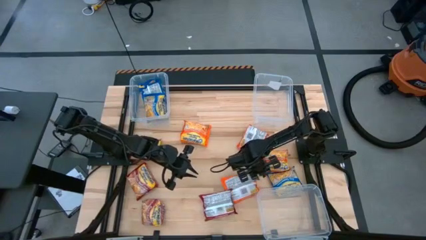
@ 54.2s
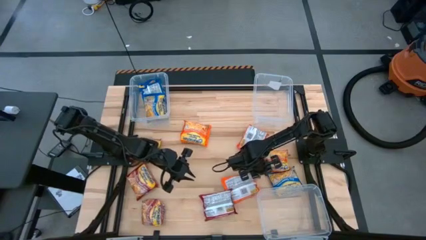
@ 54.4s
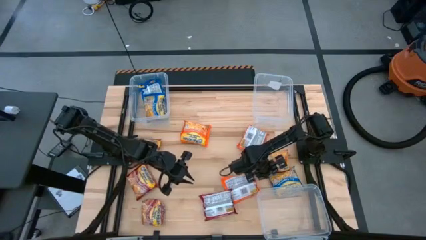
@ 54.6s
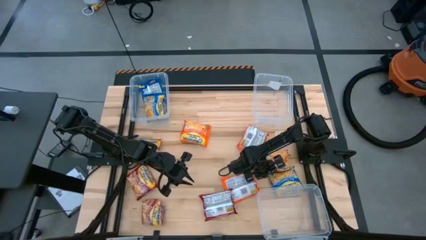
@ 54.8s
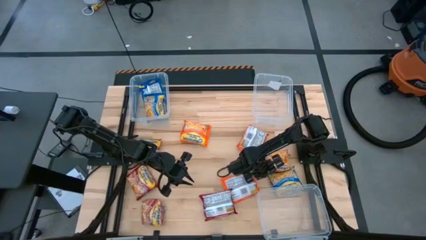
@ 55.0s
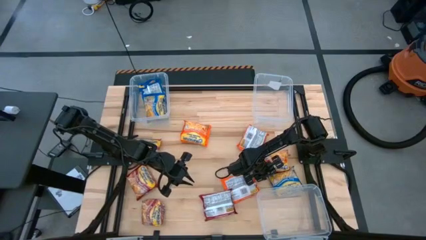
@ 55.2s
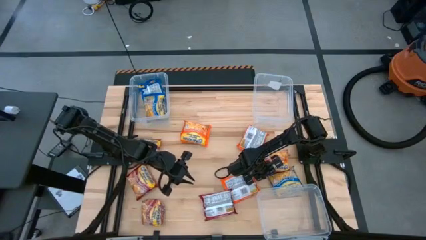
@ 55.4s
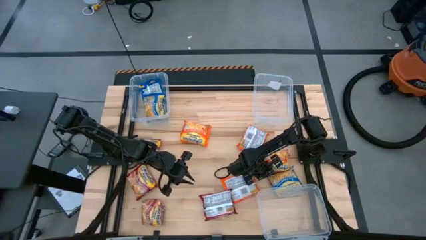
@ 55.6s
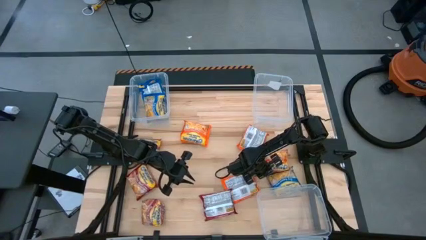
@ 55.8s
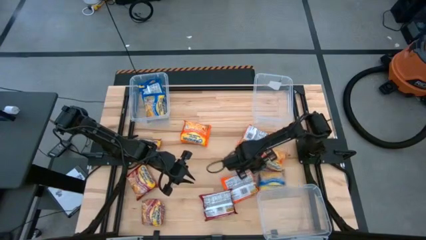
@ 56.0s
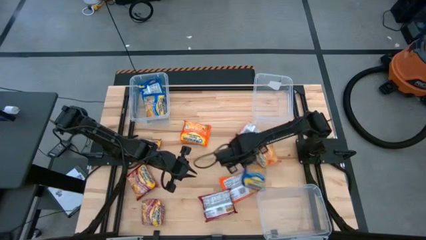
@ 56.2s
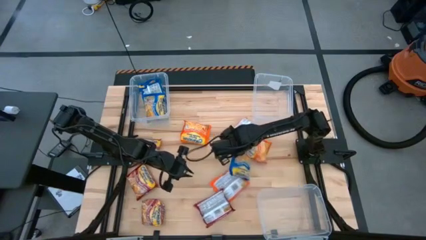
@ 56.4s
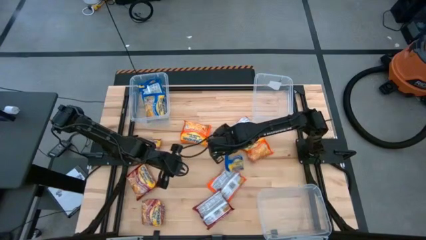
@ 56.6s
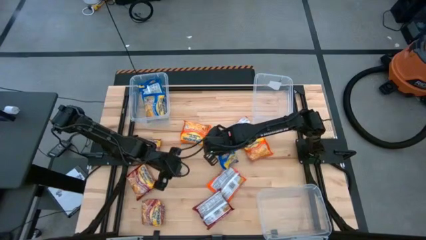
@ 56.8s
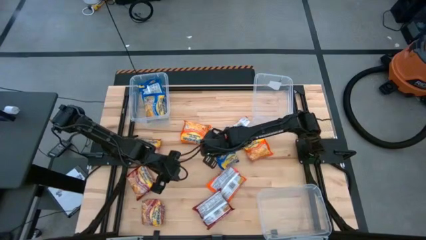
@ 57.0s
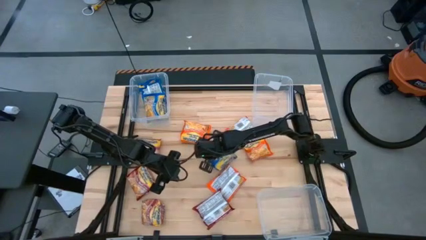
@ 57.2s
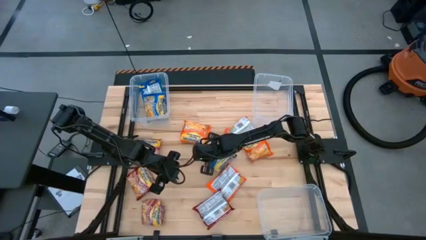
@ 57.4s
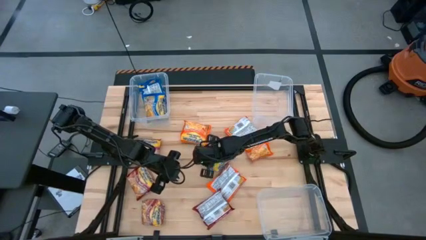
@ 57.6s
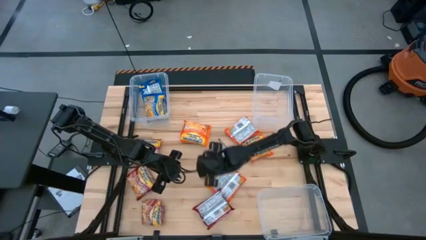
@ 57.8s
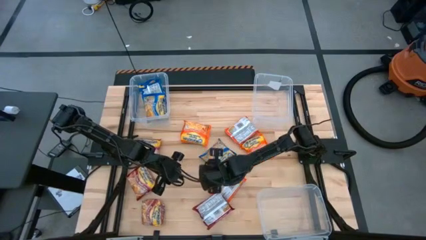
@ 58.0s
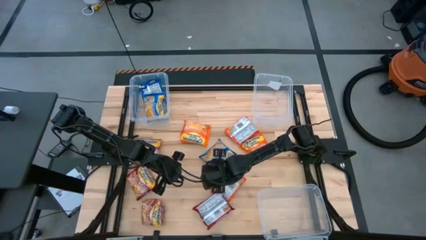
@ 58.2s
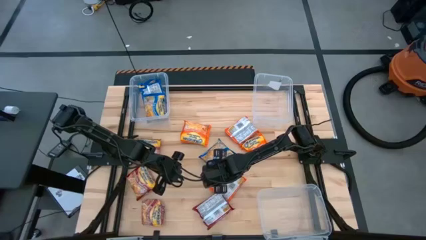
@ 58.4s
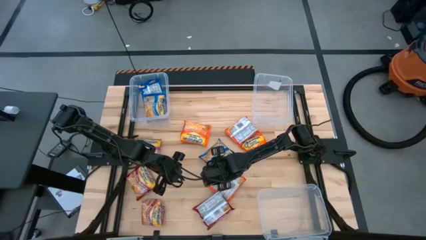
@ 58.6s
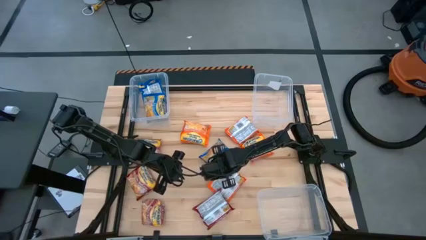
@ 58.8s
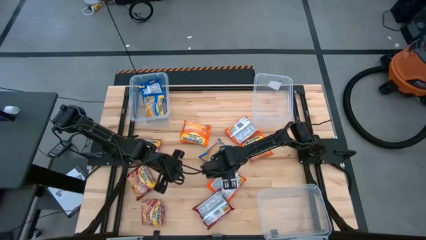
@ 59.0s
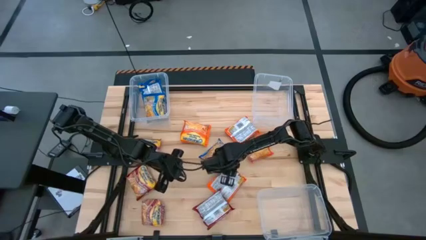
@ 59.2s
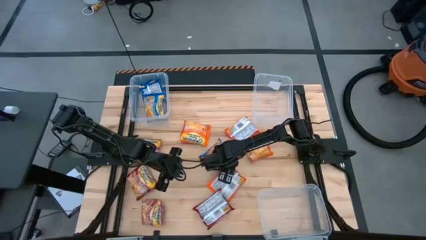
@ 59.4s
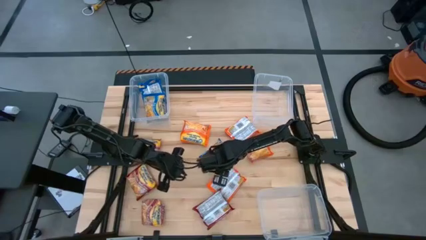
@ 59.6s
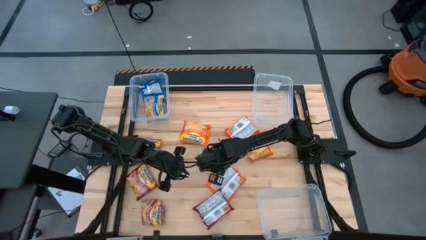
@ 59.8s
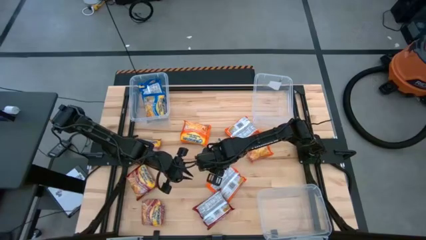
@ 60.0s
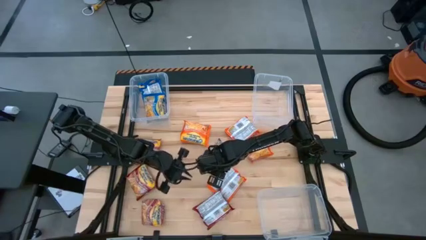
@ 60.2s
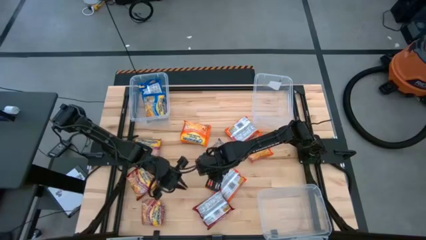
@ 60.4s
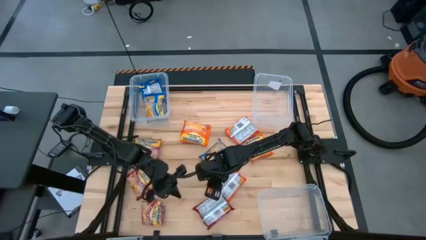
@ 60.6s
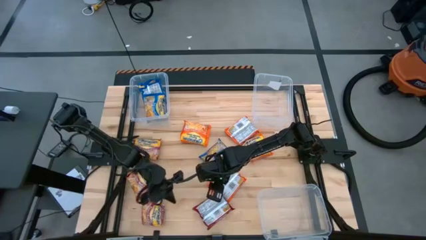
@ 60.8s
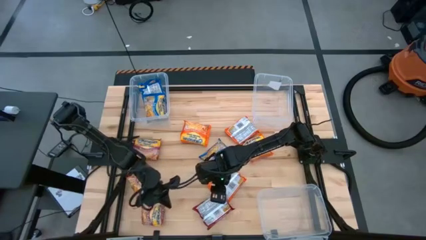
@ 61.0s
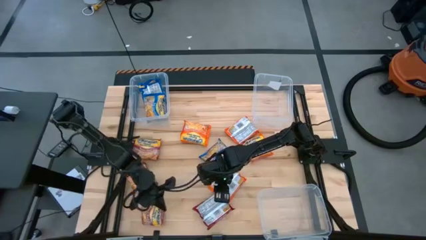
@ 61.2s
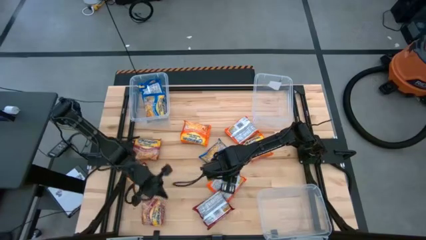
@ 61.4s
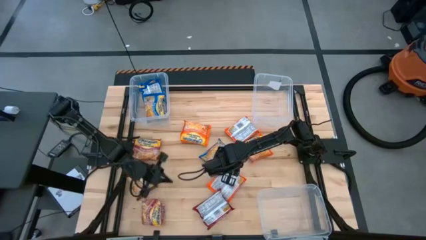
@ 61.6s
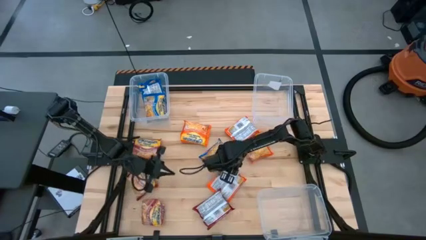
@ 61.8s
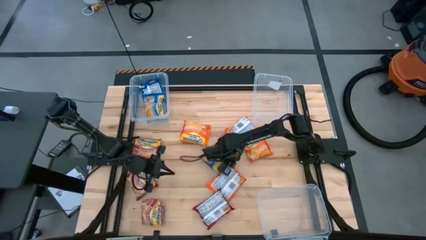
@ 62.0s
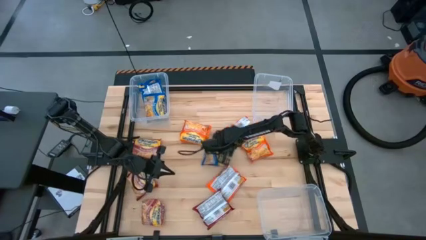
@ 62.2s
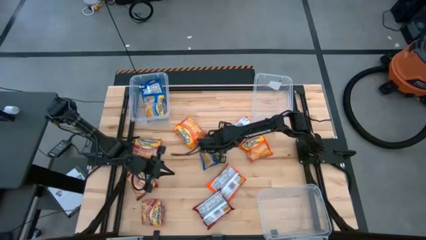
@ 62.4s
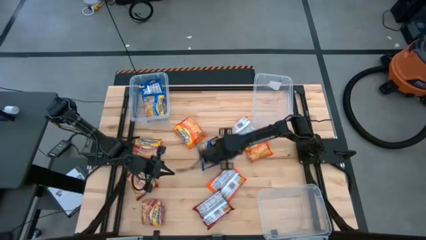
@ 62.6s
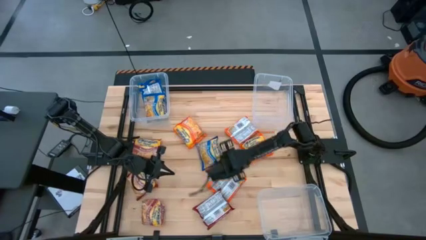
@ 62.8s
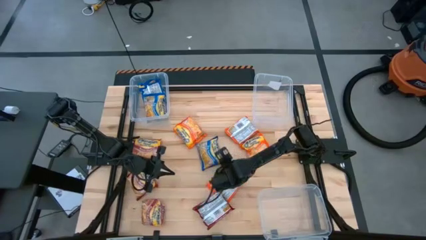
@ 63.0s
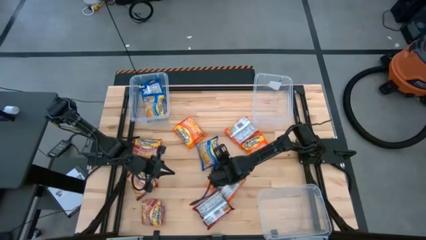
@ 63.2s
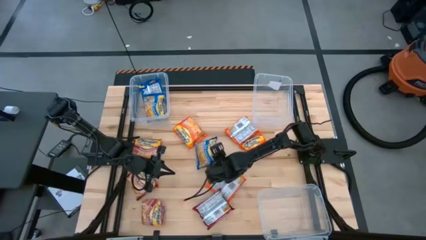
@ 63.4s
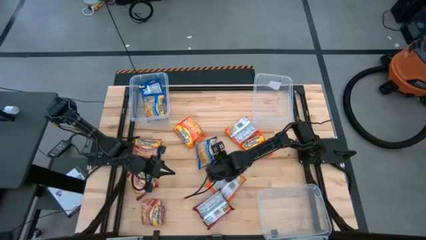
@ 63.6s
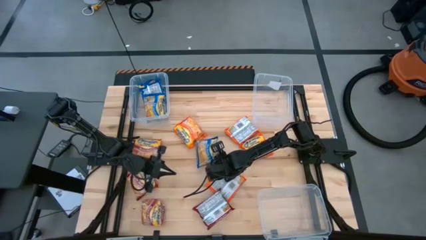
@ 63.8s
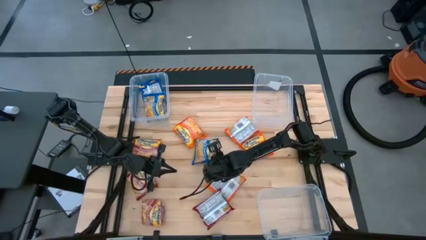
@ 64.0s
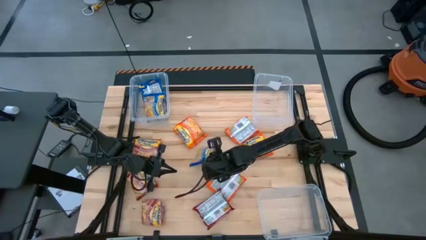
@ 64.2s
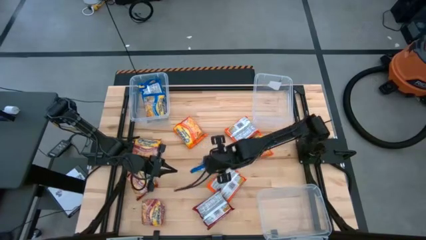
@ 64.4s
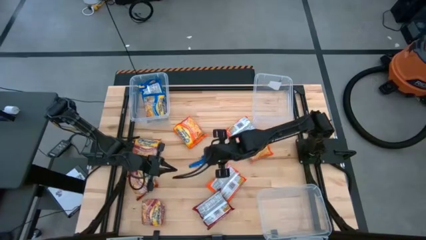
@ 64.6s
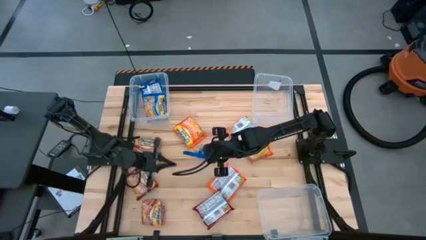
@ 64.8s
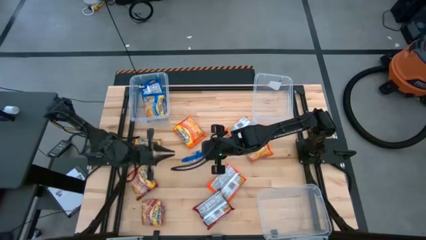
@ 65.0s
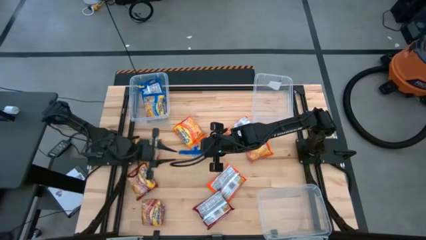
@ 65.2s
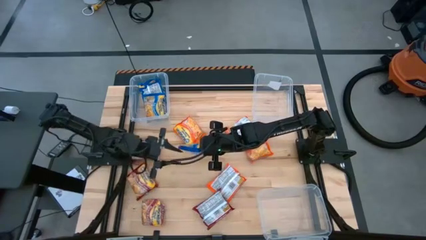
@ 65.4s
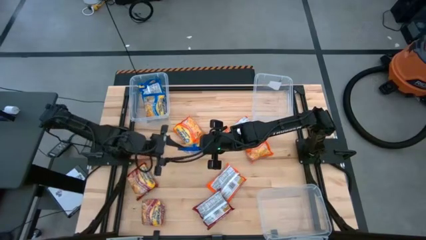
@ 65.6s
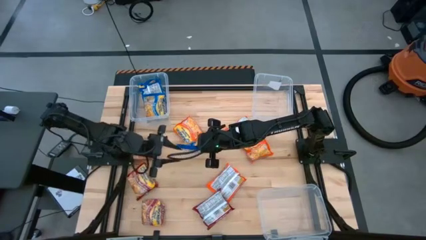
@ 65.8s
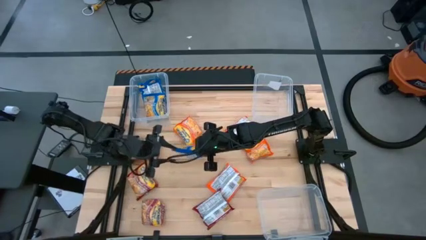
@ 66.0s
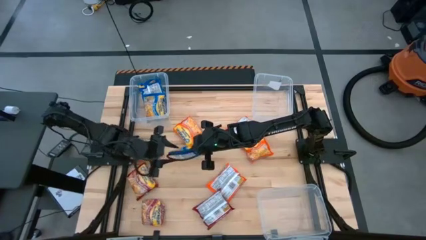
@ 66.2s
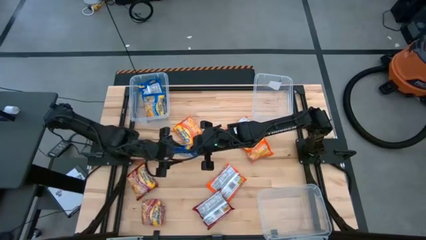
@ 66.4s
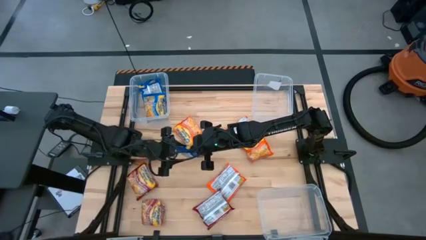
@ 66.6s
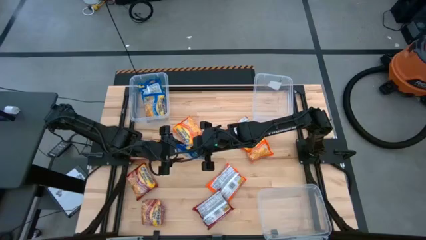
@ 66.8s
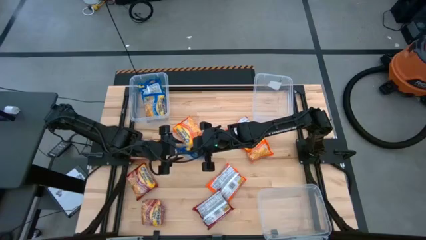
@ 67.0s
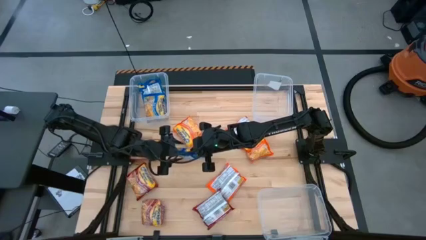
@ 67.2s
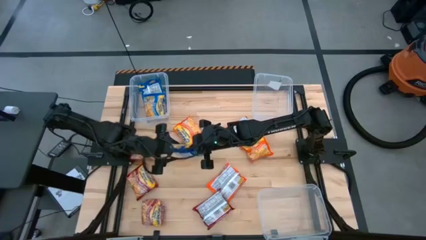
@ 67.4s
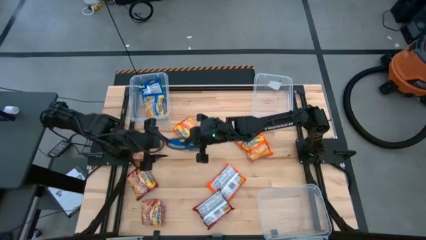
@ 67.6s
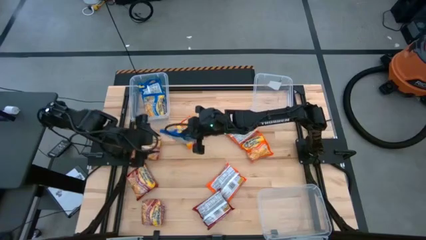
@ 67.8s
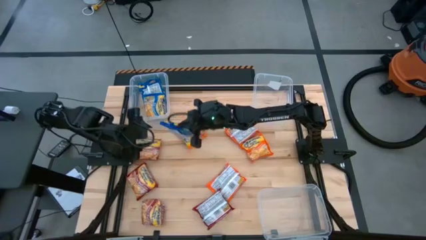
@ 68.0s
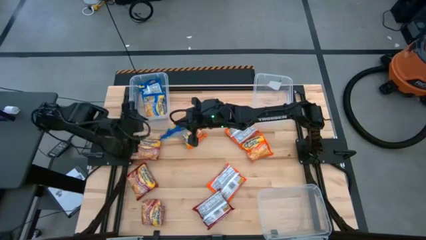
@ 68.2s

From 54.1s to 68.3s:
Task: Sort Maruchan noodles
Put the blue noodle pack into the top left transparent bin
